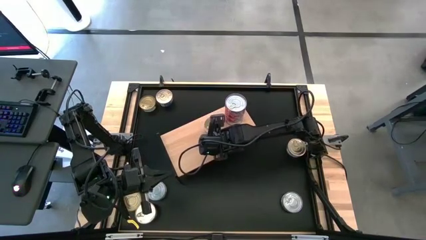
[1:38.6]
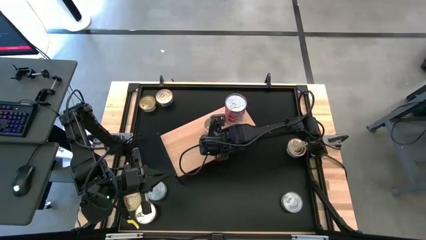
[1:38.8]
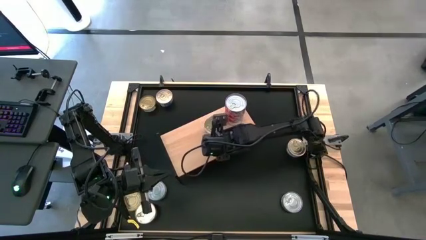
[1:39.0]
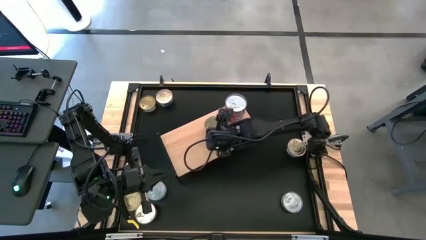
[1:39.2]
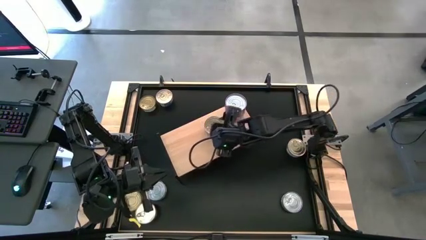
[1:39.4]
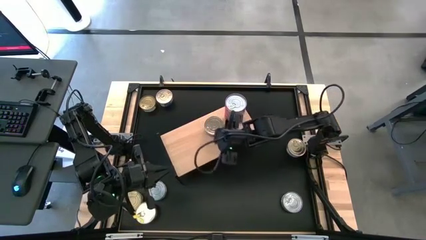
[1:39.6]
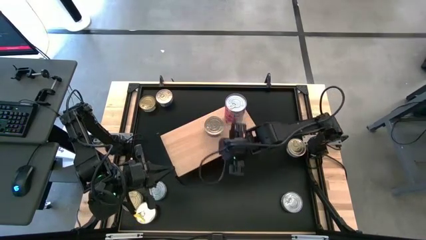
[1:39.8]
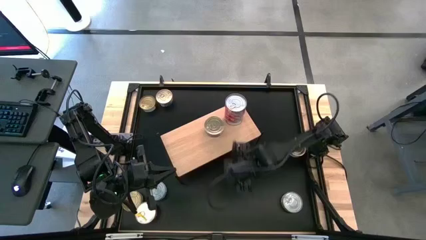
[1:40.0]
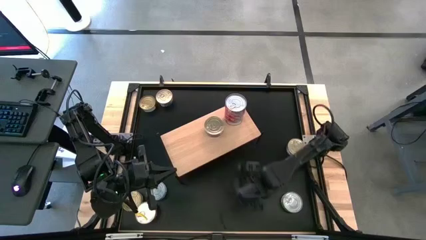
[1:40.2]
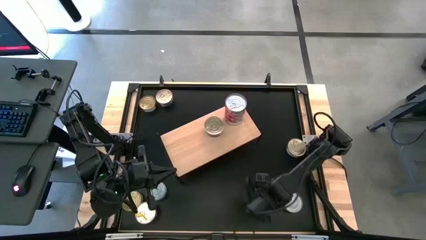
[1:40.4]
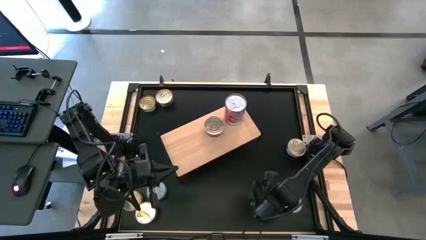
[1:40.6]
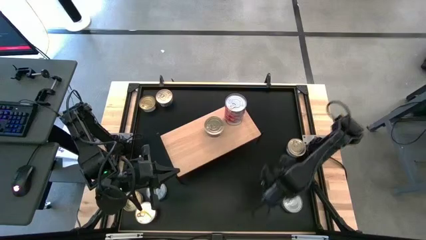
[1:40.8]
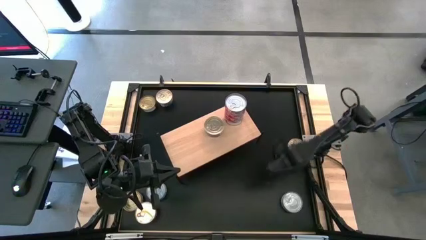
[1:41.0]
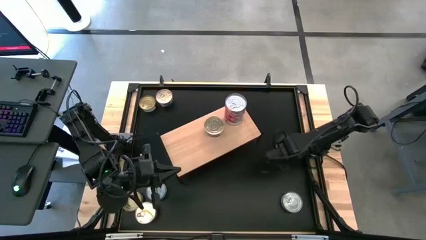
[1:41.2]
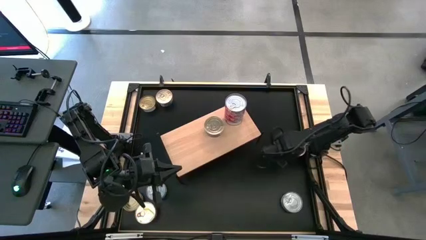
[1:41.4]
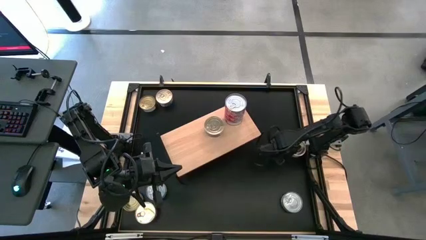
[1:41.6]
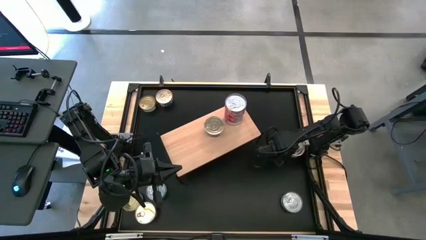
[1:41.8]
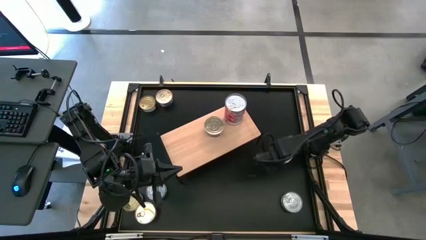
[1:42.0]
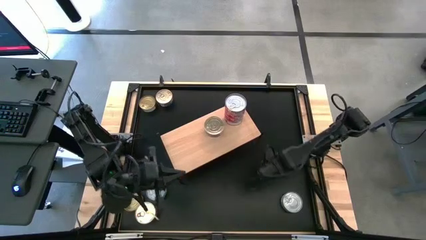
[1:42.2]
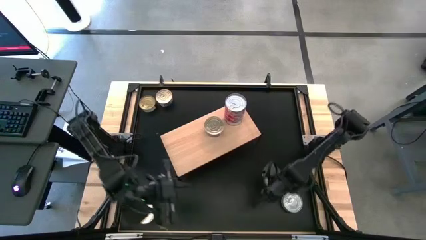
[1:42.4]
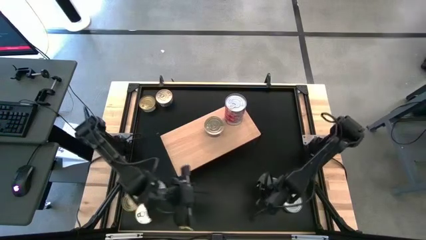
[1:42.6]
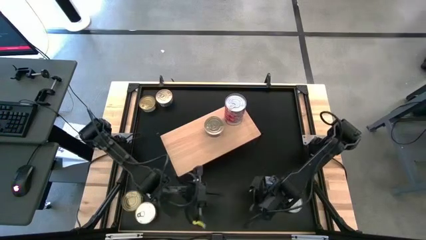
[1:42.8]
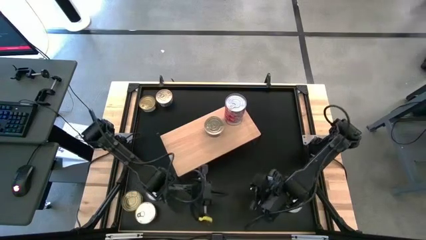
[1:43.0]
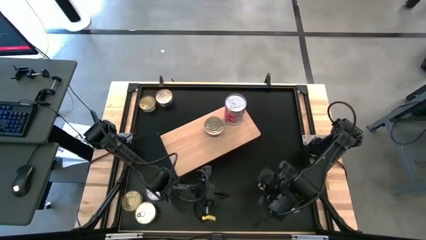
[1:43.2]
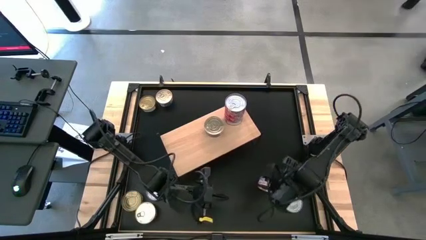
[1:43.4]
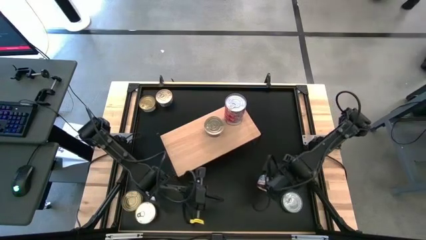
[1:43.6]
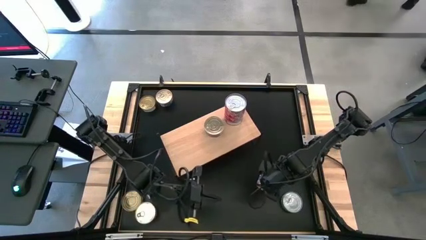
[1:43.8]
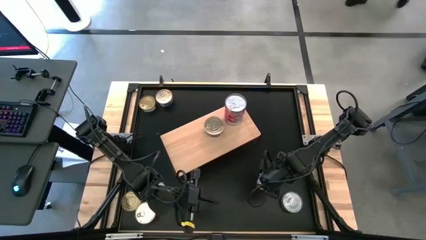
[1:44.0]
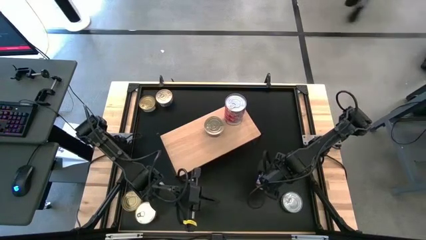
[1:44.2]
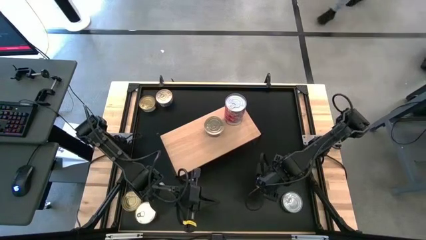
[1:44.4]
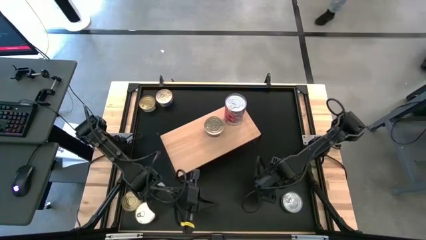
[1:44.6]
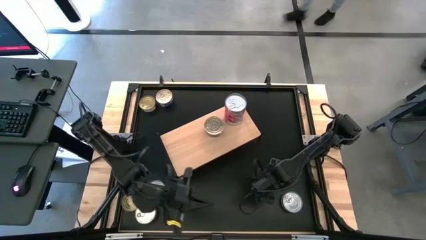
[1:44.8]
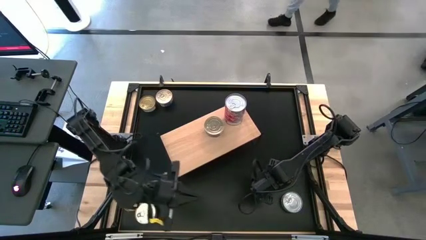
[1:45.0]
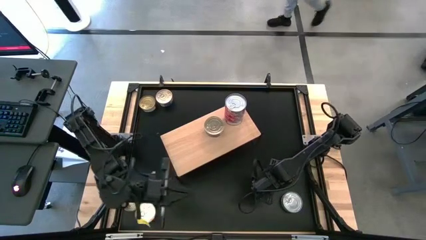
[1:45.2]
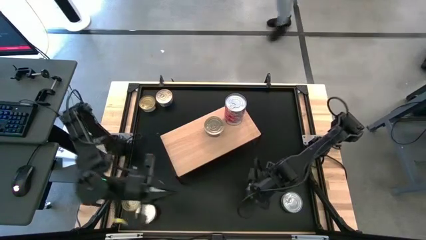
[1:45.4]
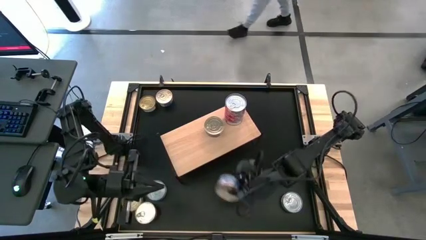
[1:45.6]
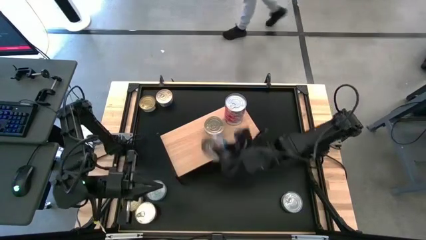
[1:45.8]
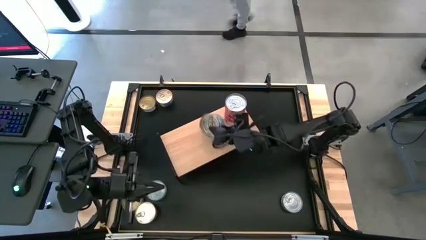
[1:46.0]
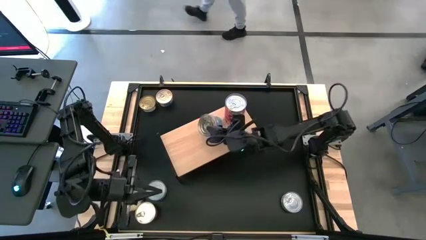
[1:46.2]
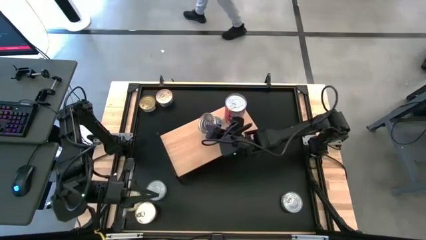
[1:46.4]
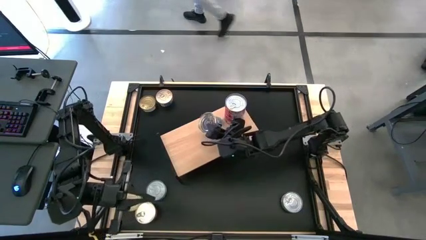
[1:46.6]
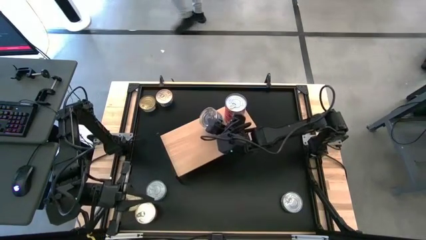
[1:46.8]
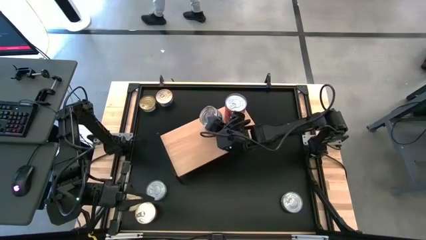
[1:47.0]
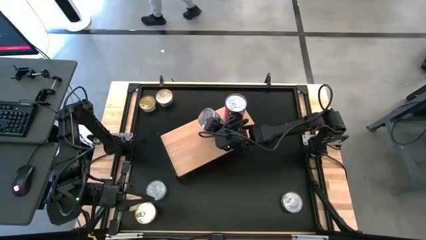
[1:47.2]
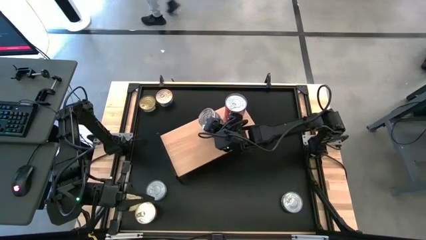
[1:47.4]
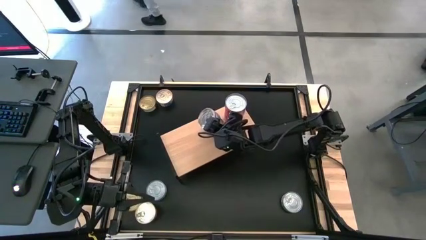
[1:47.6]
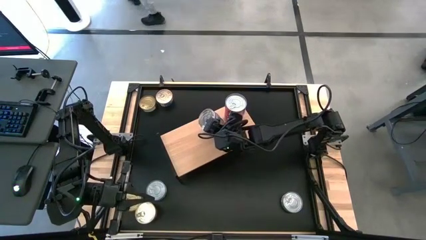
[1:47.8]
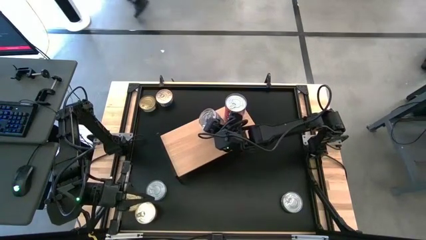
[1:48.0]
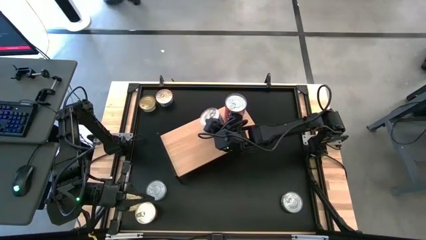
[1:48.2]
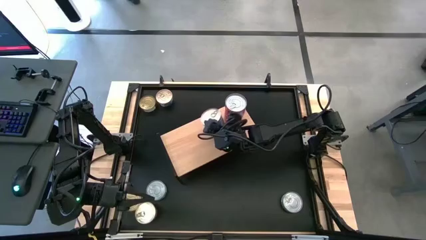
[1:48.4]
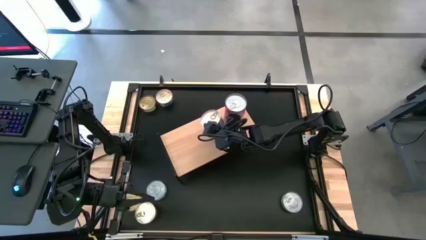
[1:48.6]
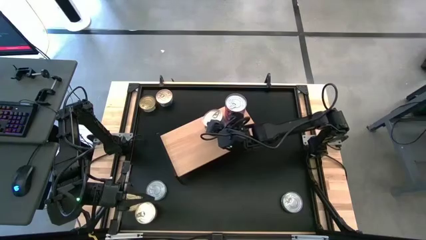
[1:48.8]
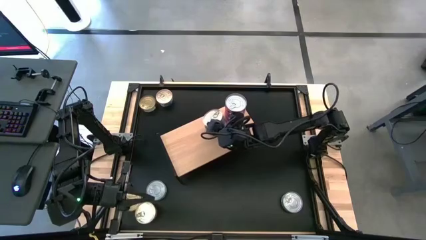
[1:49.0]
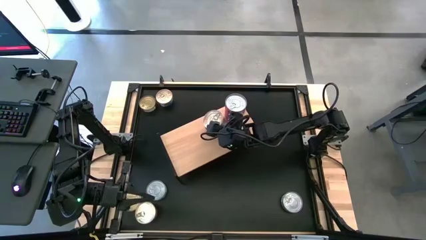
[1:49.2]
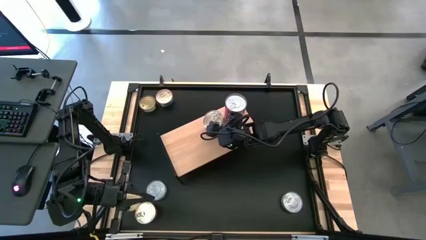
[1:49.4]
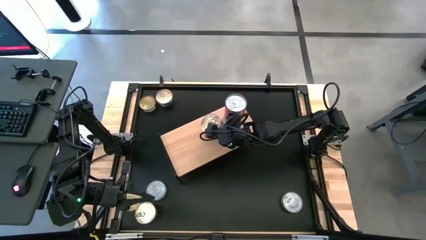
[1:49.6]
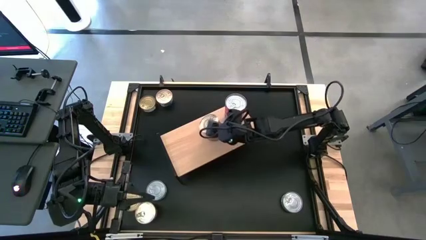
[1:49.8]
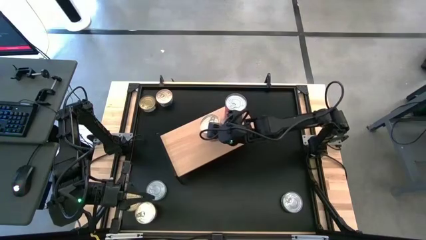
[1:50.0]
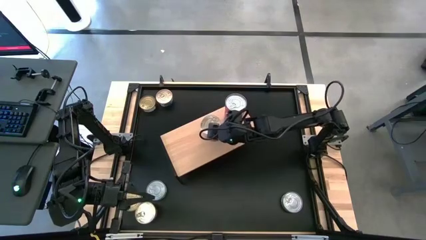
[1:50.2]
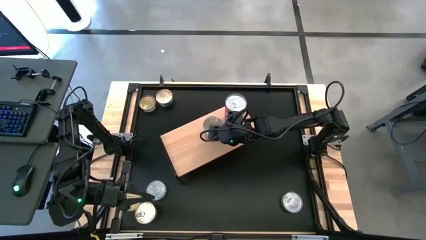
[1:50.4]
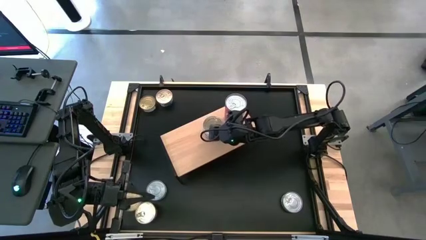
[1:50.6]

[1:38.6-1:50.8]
Task: Stack canned seafood by type on shelf
Stack the blue tuna can on the top of the other blue tuna can on the shelf

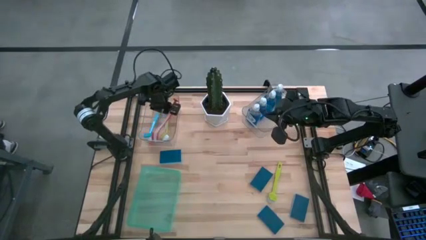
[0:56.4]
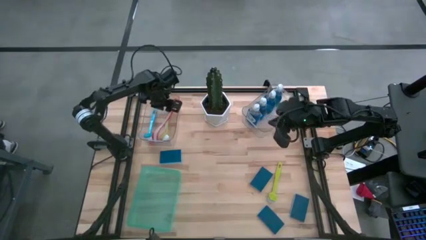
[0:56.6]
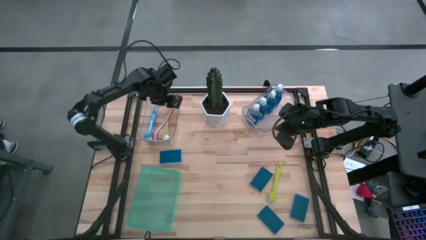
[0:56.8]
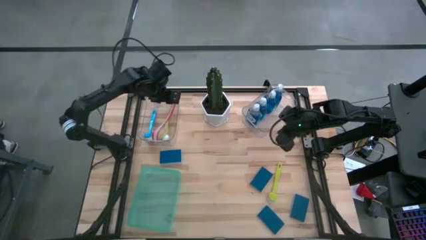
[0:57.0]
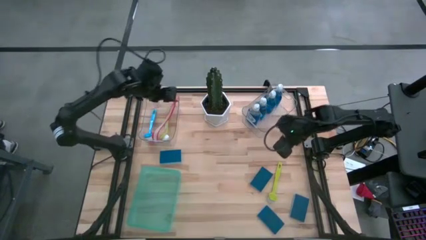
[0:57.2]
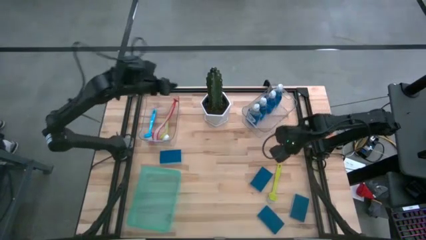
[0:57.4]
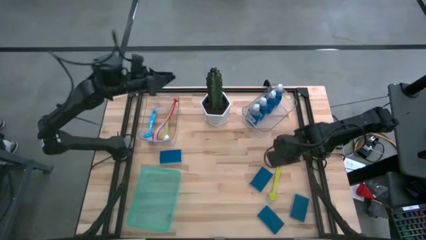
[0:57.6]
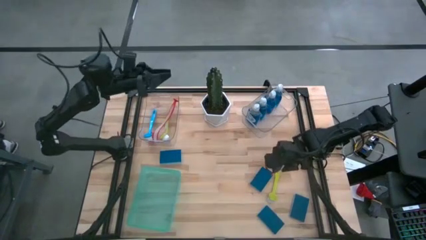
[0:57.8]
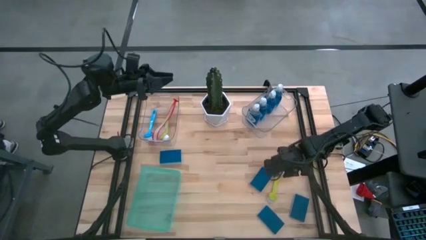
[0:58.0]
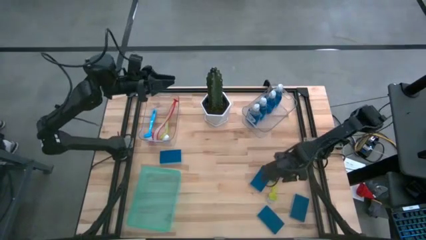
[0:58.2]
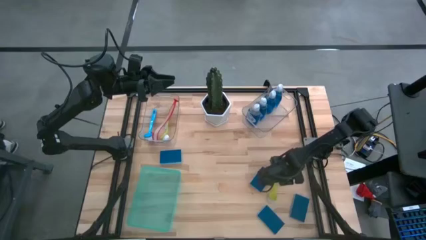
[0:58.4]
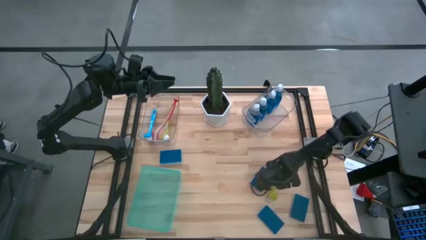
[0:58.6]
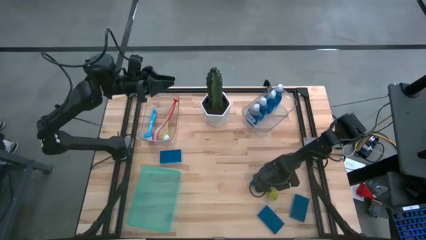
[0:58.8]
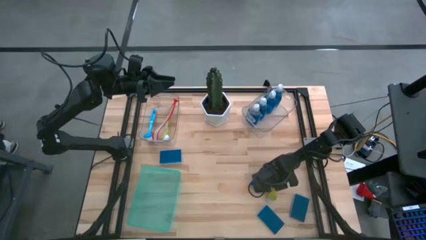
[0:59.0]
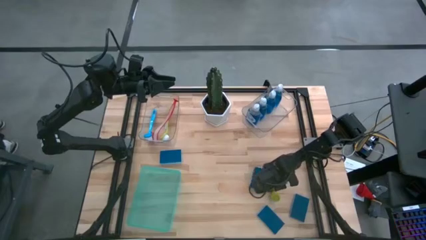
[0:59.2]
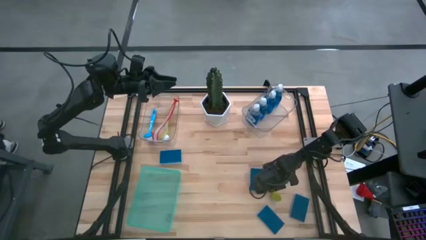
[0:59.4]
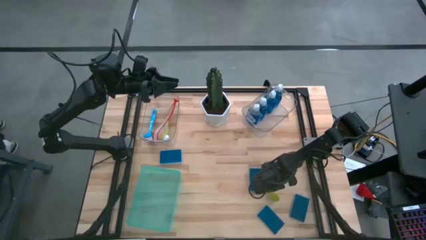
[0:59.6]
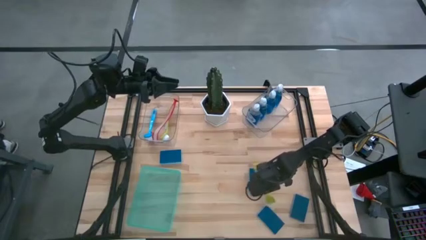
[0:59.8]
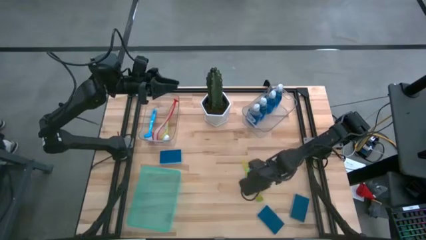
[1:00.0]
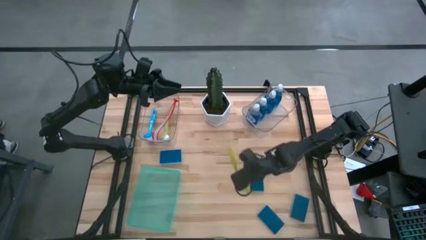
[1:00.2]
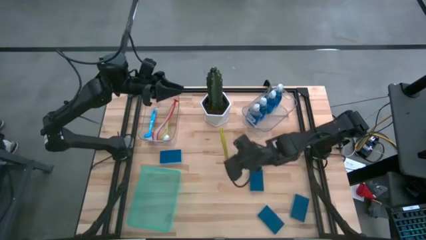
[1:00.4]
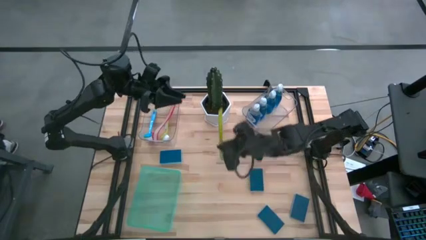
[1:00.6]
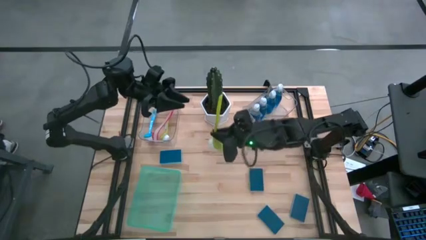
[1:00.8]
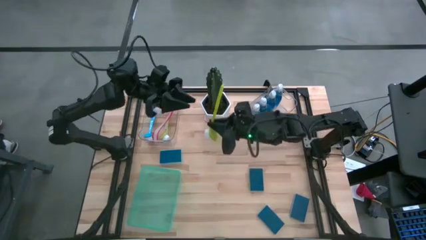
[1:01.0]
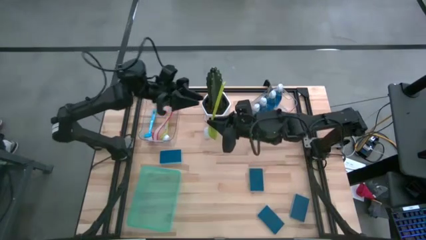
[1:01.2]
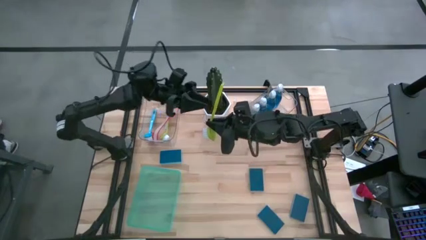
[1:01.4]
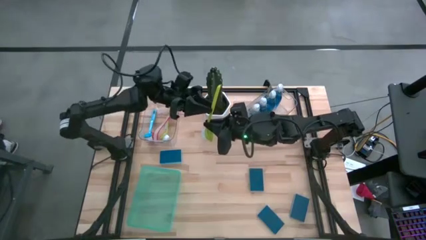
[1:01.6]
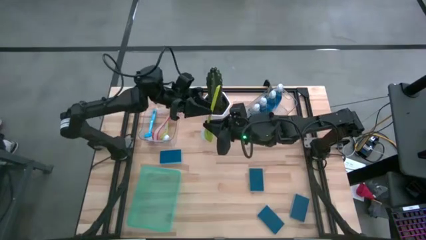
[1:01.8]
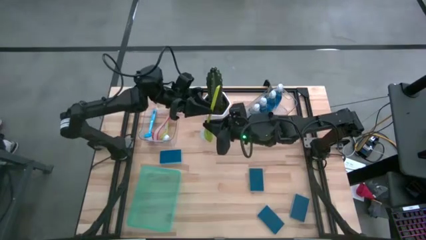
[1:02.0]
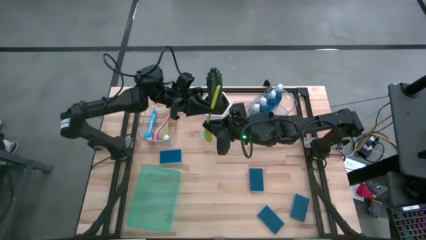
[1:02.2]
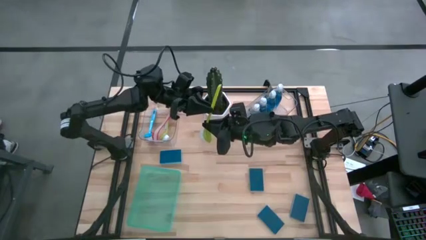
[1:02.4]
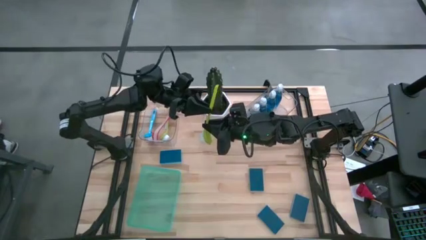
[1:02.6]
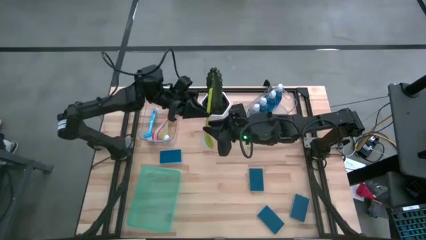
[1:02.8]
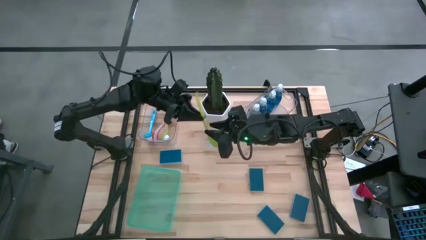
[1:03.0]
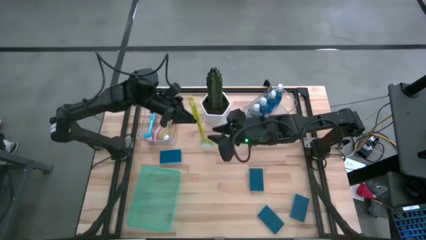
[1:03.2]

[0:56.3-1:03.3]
Task: Pick & Place Kitchen Sink Supplies
Put the green dish brush into the left transparent bin
